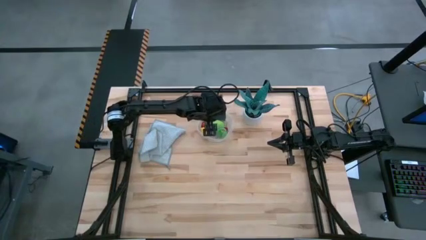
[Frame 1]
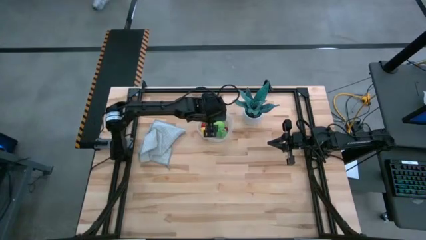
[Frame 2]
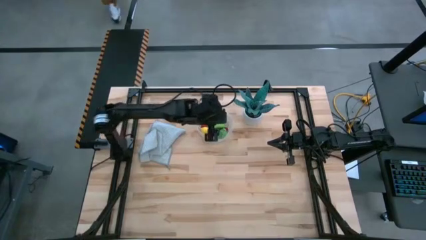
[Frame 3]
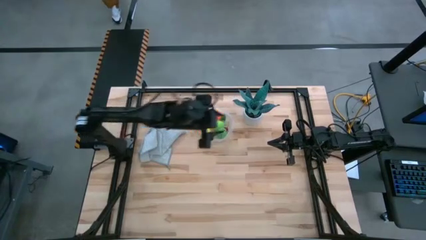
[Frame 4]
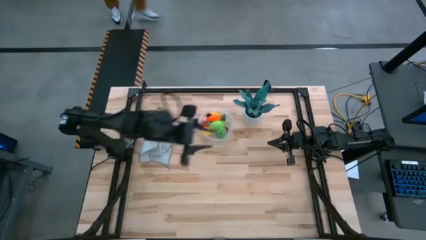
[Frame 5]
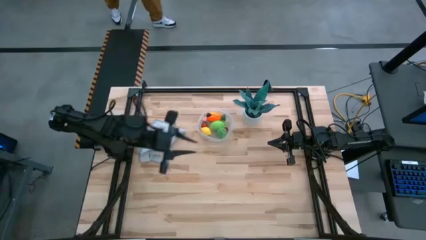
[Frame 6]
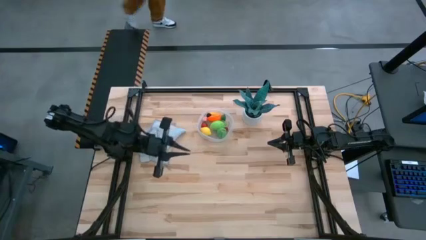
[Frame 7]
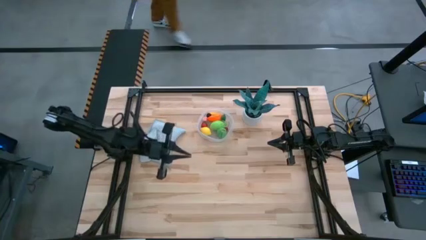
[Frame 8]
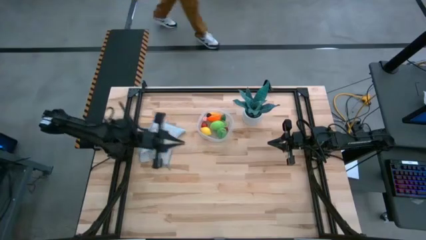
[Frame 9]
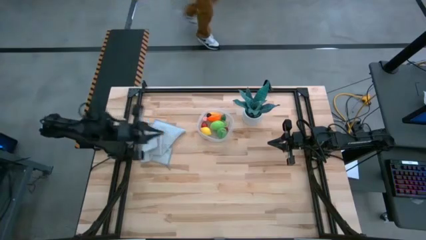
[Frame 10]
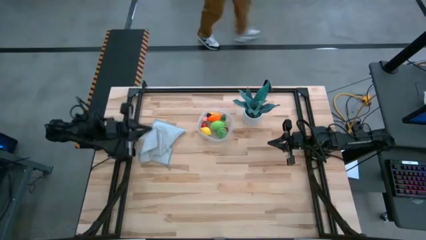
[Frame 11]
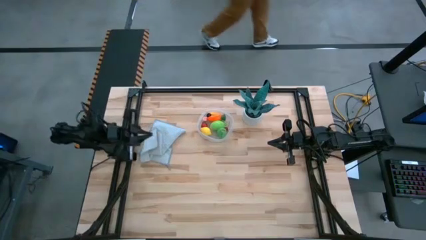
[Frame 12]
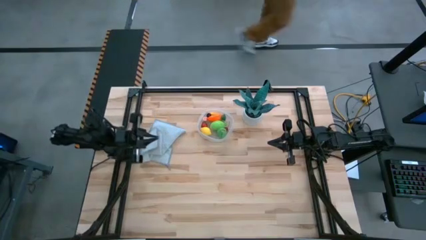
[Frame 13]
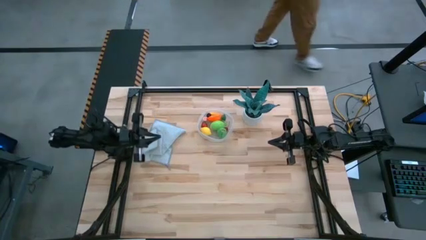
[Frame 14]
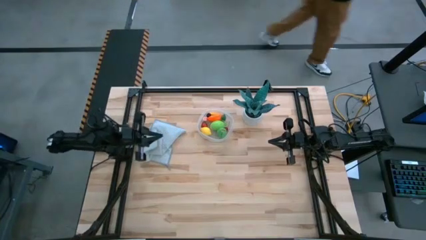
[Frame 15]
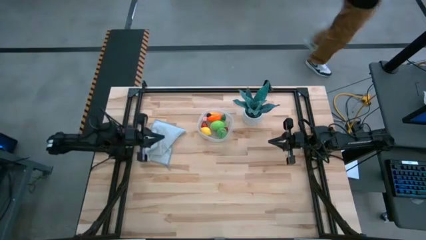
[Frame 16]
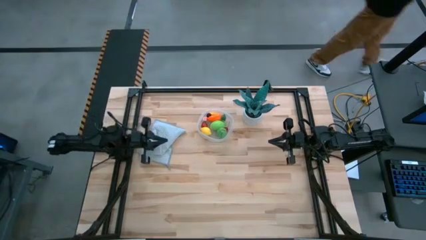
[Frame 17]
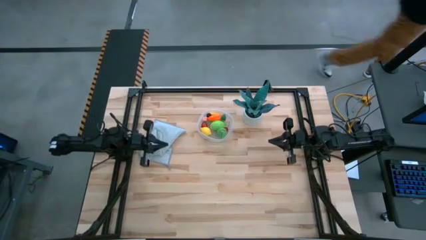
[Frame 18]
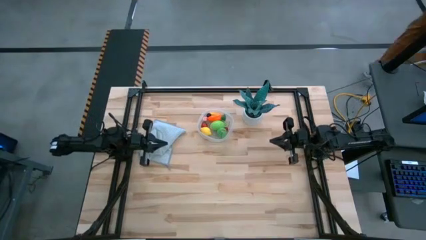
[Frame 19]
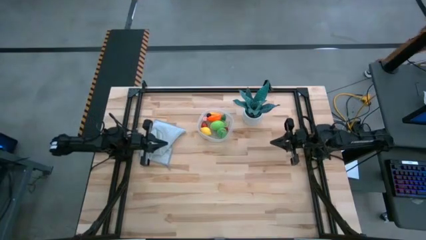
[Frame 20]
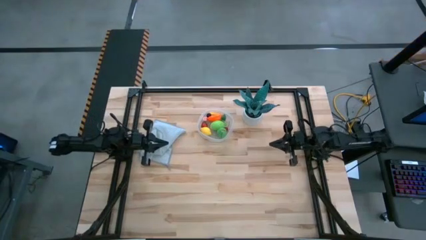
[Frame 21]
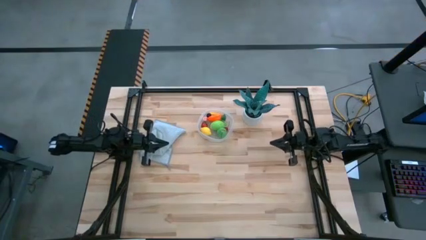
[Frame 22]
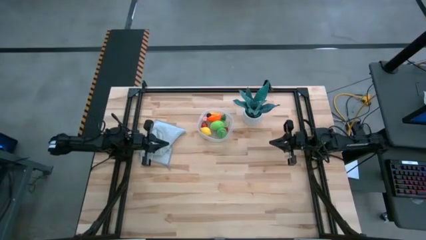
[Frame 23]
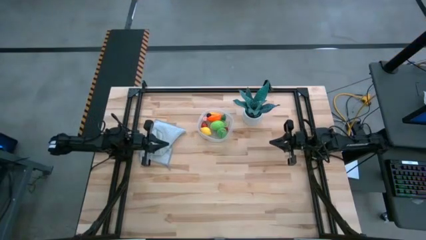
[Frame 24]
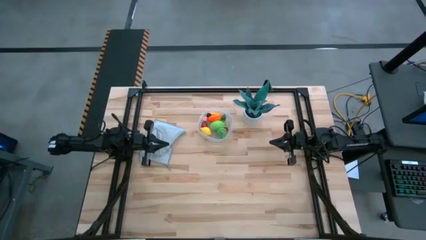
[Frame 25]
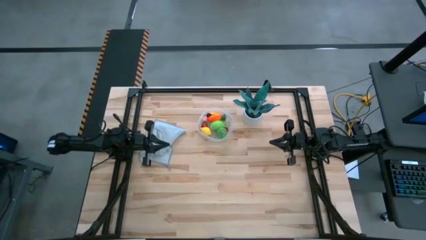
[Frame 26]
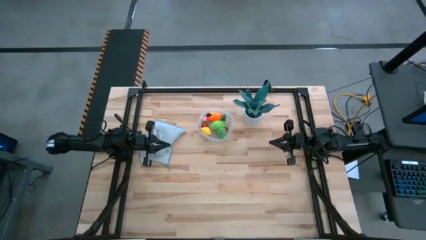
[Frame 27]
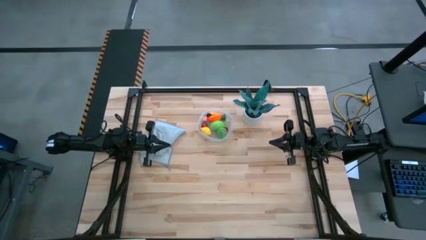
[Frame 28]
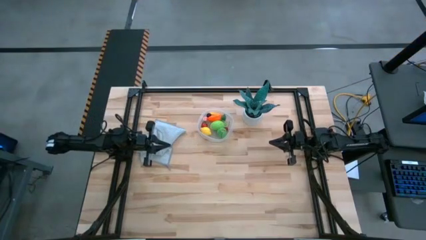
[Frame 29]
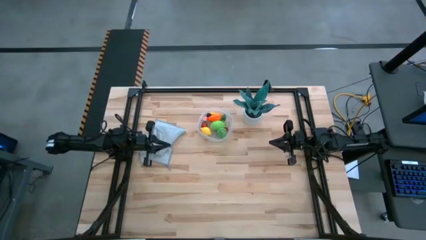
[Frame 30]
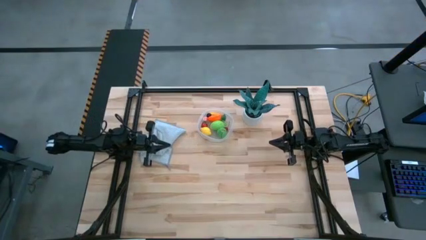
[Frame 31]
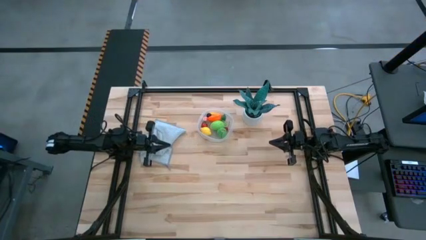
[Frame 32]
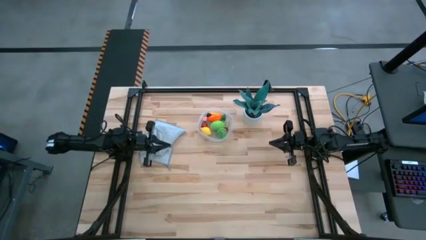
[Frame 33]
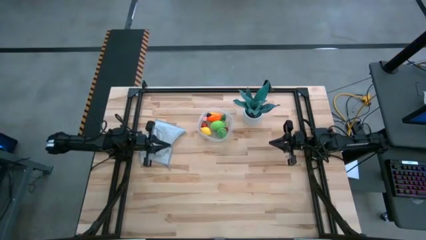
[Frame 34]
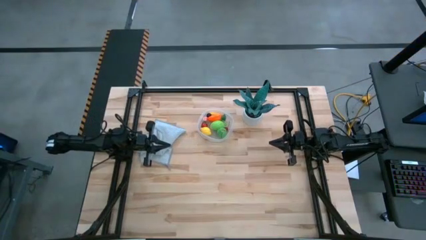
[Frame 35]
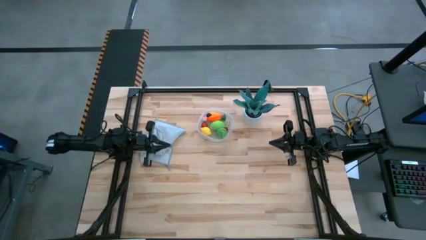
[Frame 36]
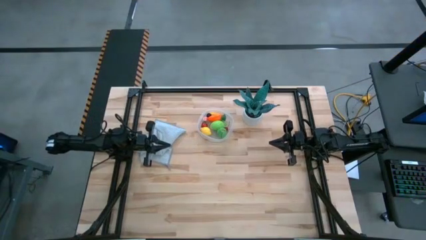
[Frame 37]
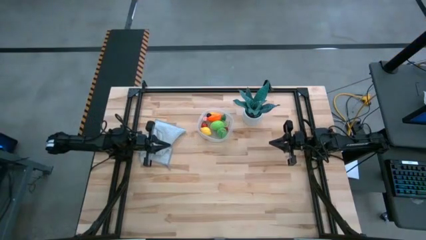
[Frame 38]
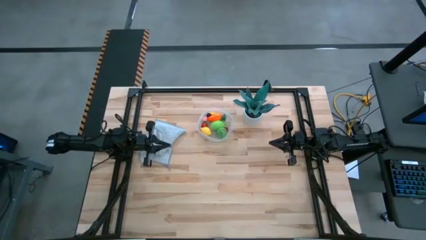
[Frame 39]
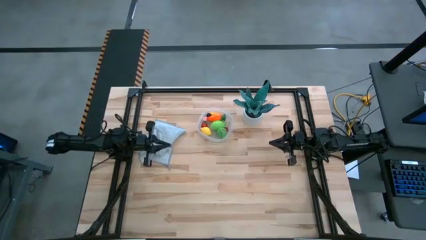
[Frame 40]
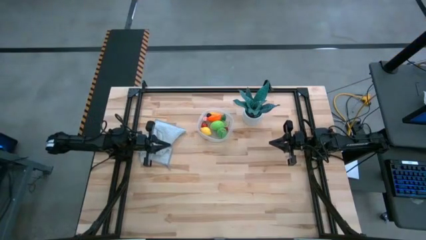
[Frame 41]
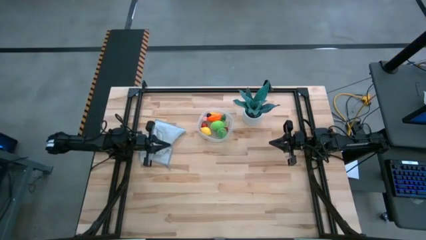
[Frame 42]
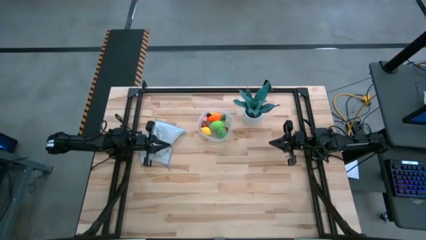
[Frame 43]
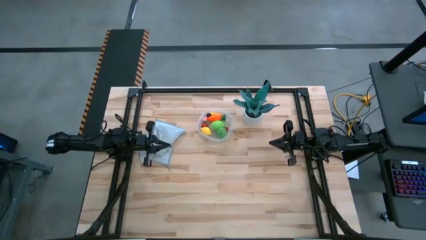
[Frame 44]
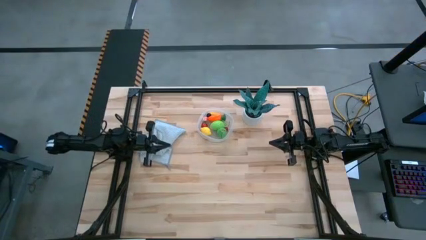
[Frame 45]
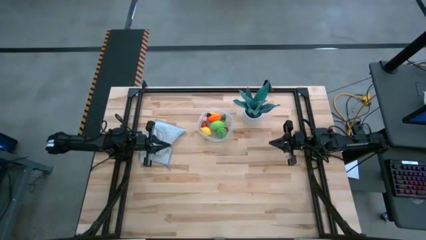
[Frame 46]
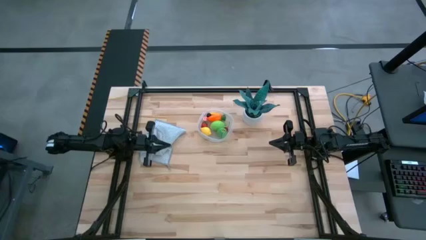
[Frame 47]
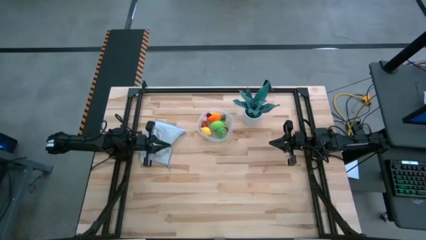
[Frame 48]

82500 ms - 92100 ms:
Task: Pick and placing Produce into tupperware
Return to Home Position

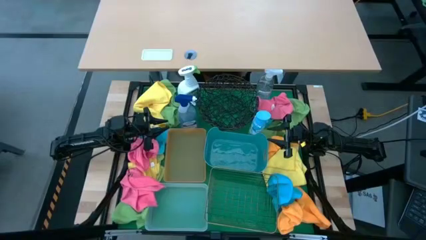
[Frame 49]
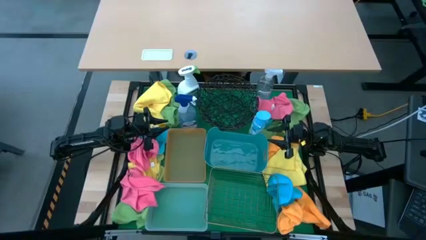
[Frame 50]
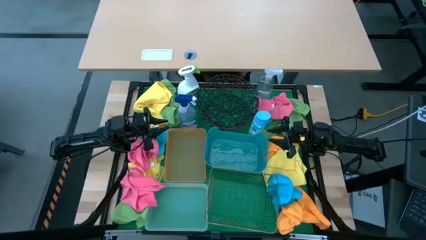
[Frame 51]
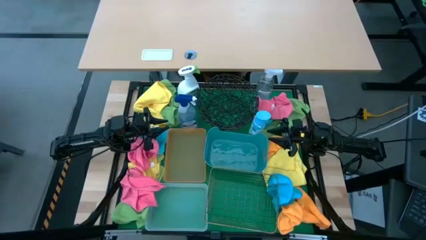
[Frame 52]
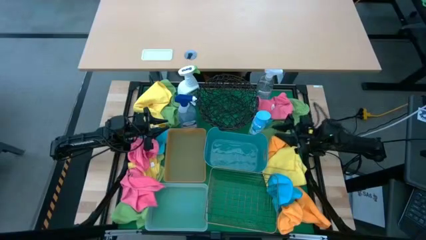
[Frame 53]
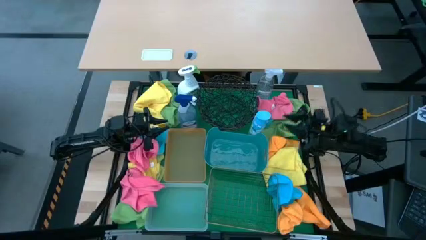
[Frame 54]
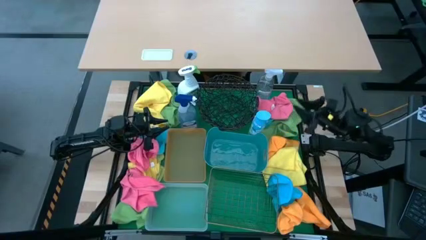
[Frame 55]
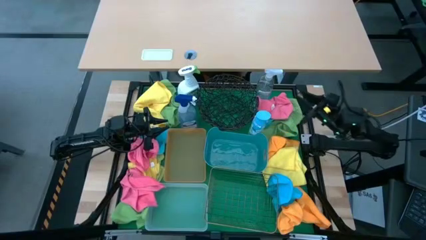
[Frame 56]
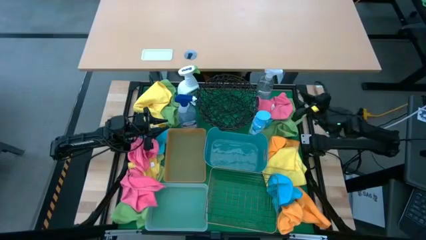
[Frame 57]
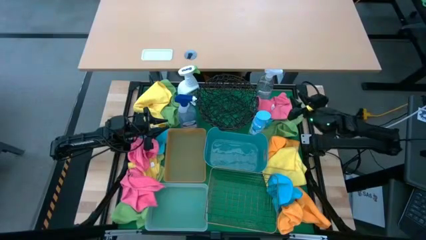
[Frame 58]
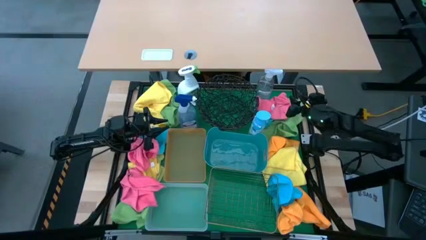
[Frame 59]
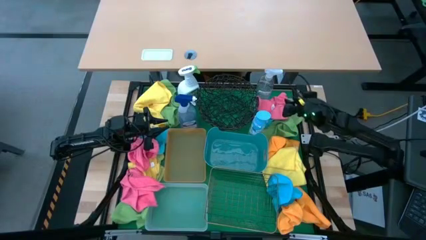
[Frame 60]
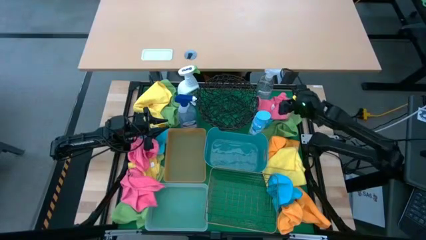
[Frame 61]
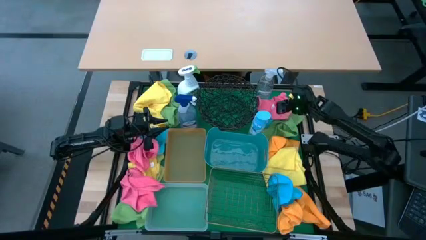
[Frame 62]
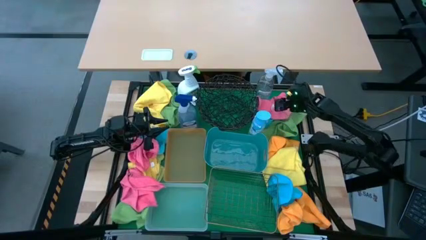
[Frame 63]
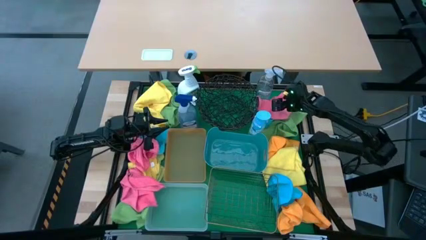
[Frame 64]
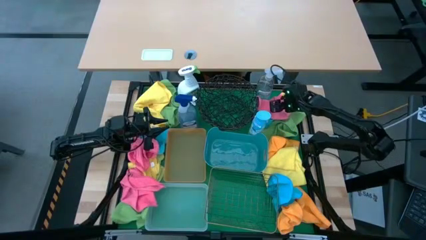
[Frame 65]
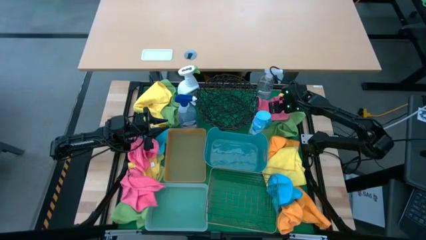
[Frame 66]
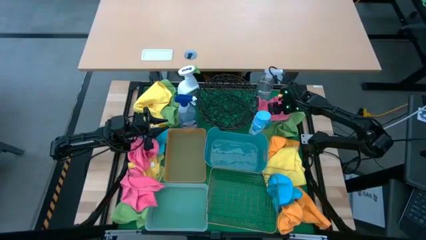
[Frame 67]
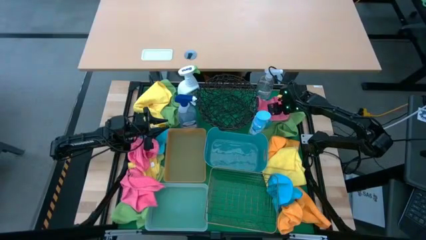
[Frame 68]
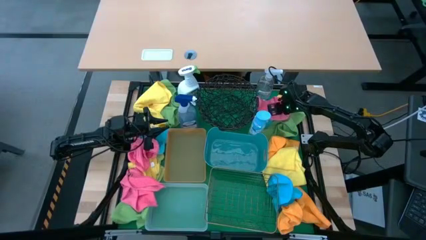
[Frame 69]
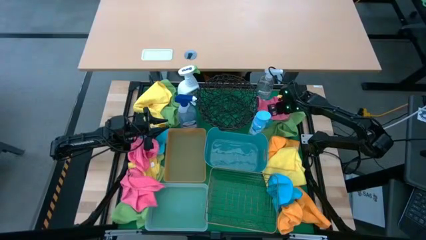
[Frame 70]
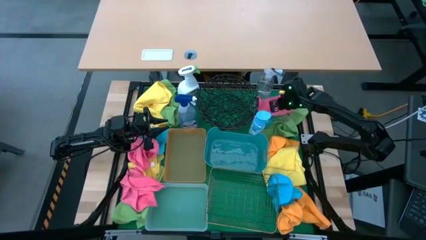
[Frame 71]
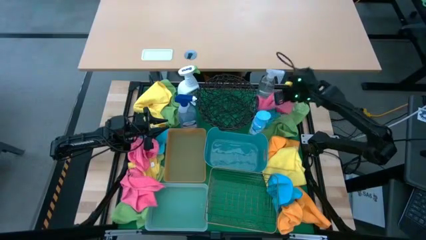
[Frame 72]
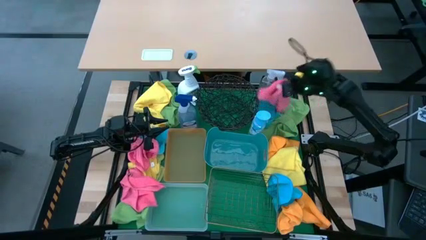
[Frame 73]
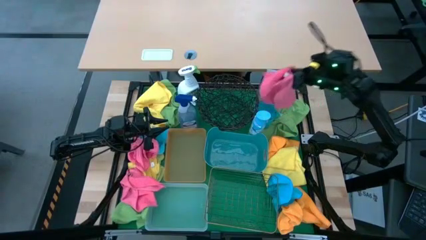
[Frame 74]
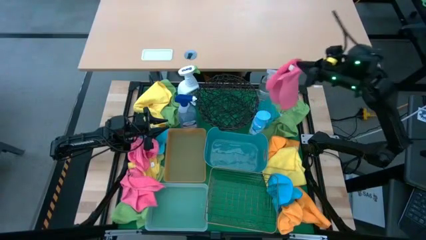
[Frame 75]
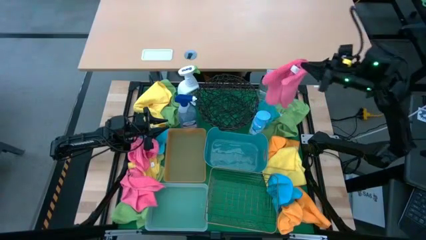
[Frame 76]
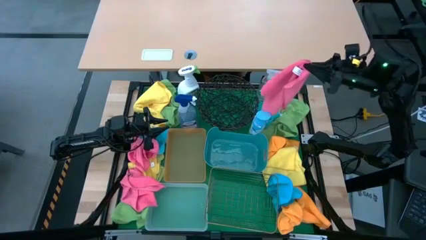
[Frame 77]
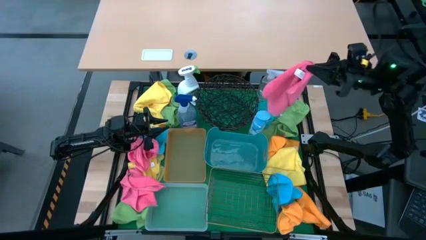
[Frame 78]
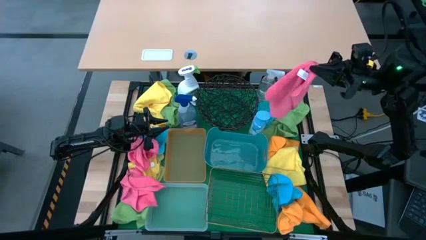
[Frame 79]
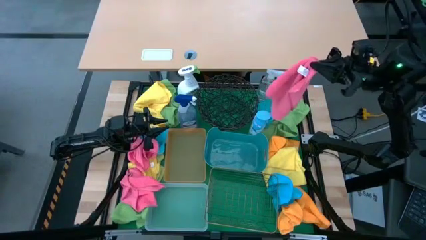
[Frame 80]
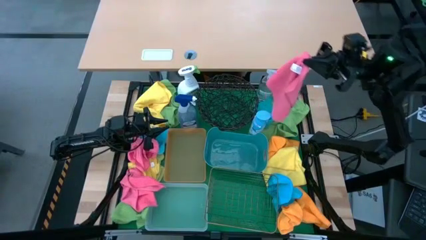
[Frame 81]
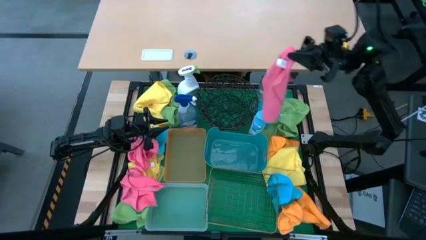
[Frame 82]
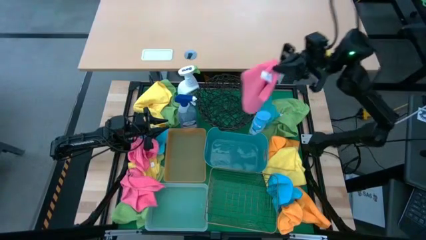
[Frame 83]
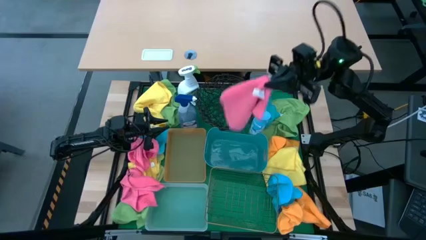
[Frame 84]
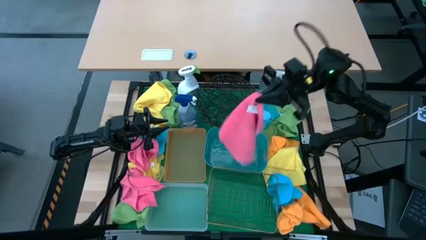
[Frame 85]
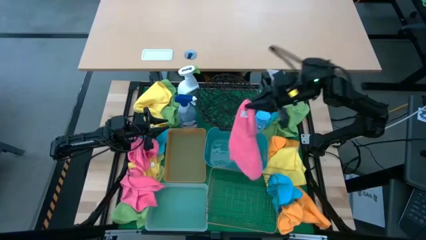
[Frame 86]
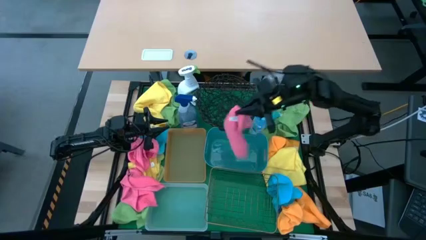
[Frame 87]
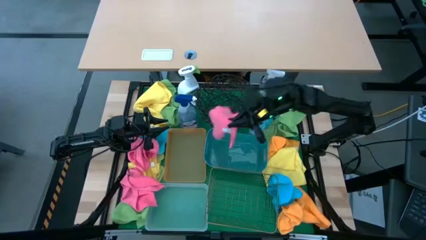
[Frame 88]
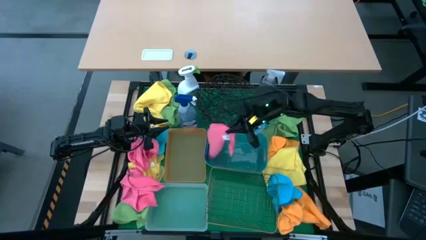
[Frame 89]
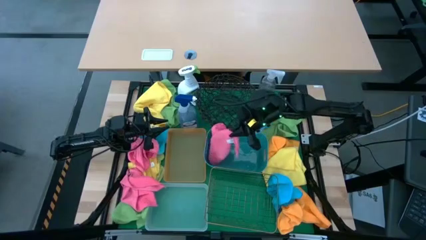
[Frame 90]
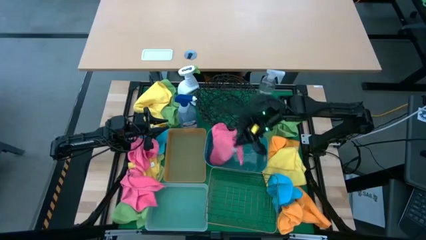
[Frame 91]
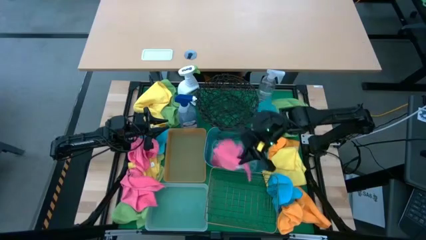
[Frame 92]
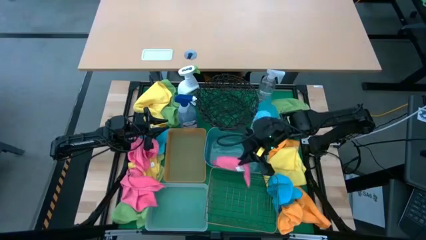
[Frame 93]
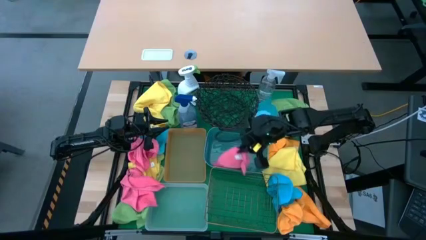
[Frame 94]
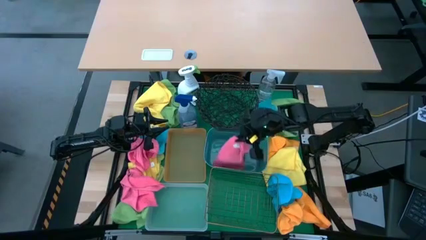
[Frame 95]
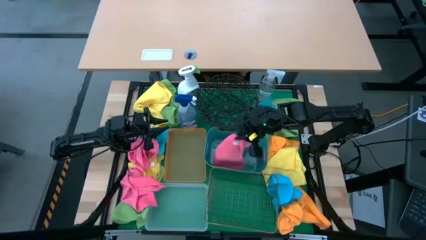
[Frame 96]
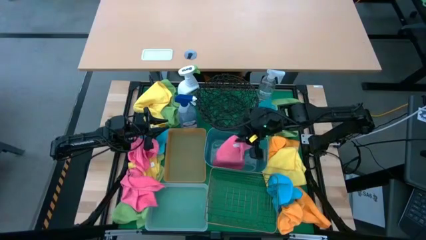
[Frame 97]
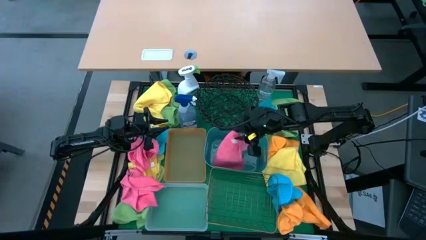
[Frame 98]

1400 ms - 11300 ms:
Task: Sort microfiber towel by color & place in baskets
Put the top pink towel into the blue bin
